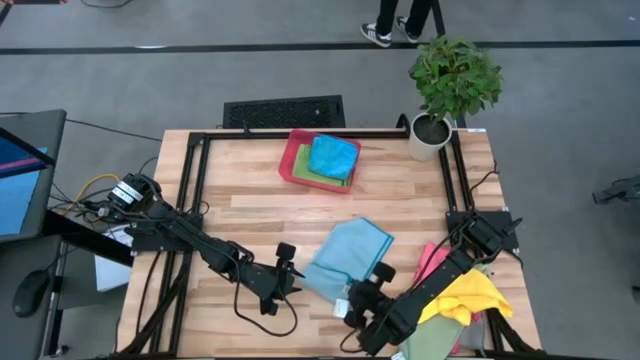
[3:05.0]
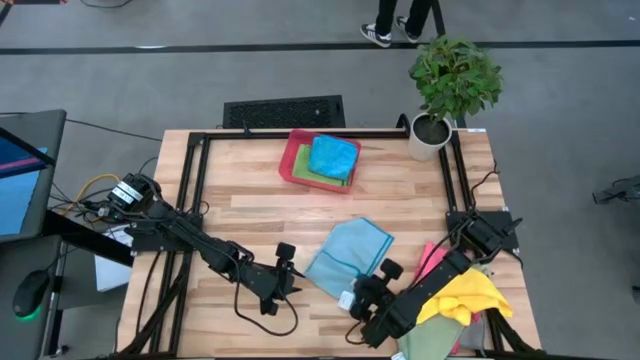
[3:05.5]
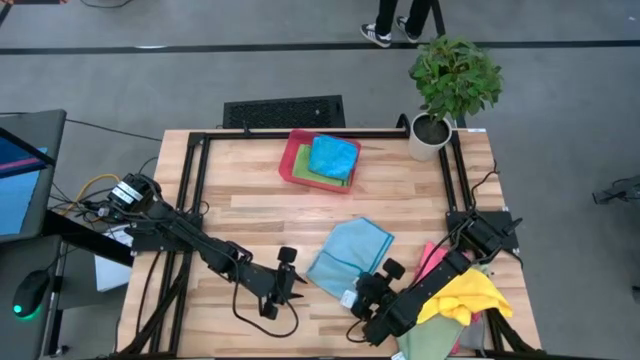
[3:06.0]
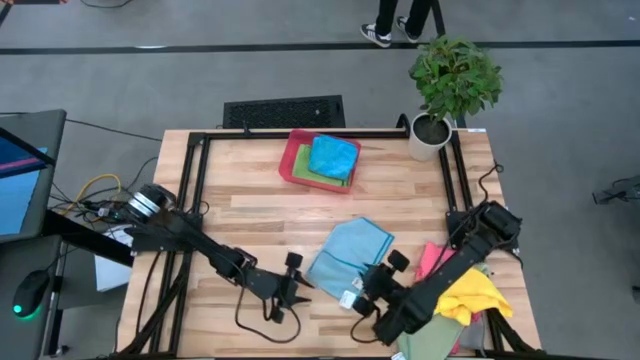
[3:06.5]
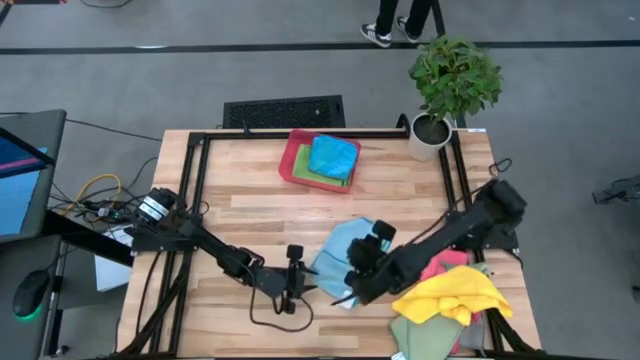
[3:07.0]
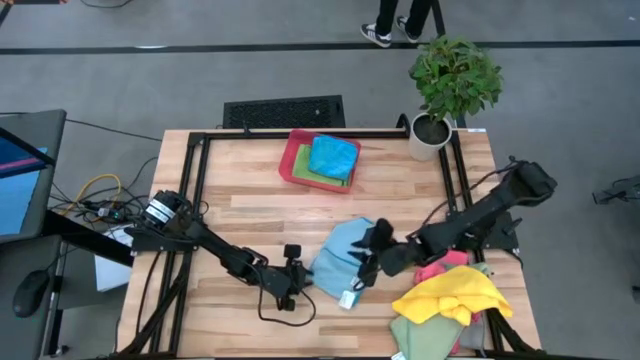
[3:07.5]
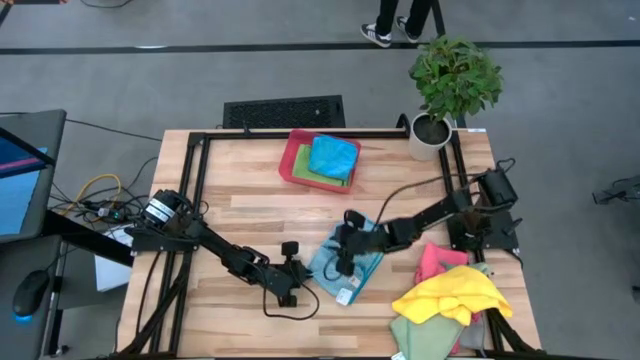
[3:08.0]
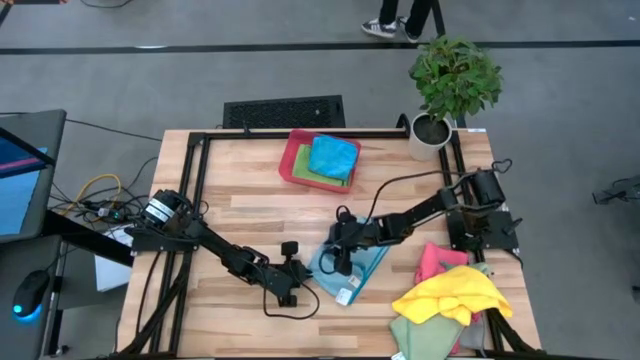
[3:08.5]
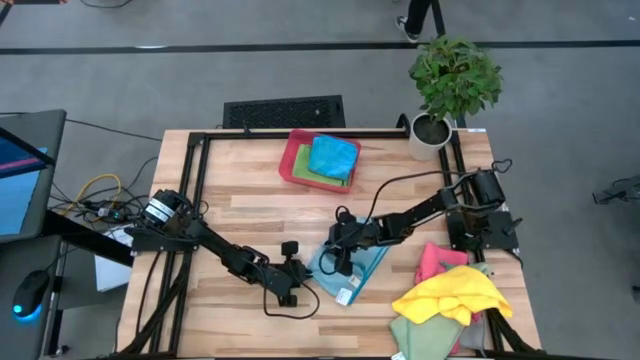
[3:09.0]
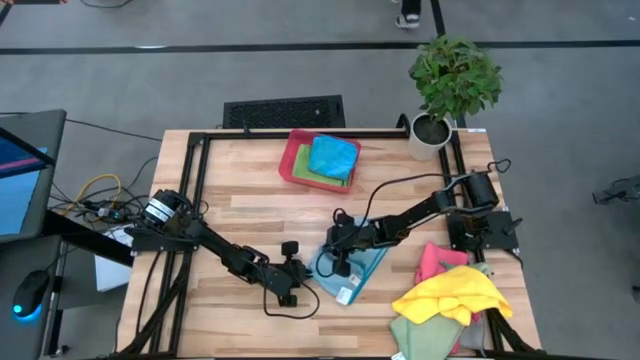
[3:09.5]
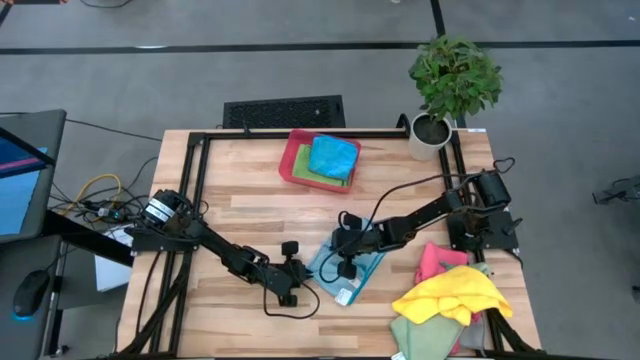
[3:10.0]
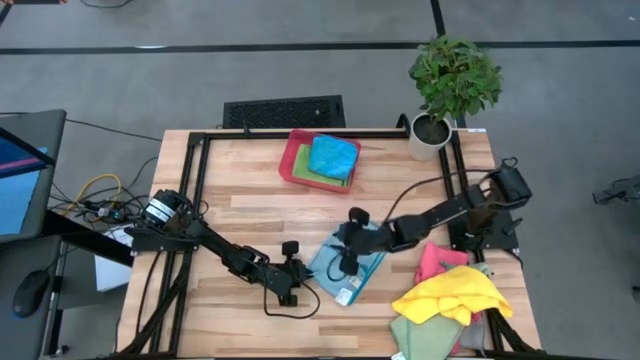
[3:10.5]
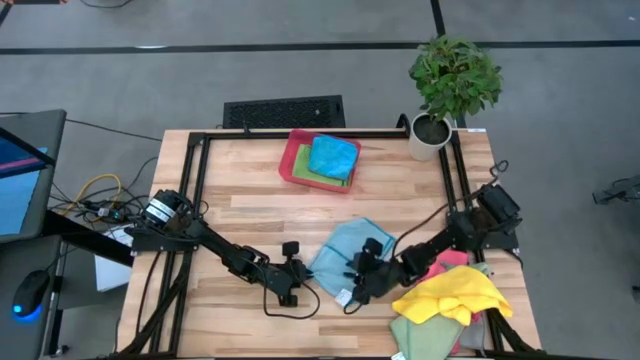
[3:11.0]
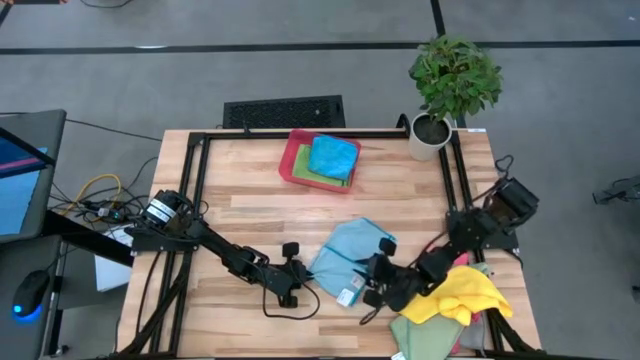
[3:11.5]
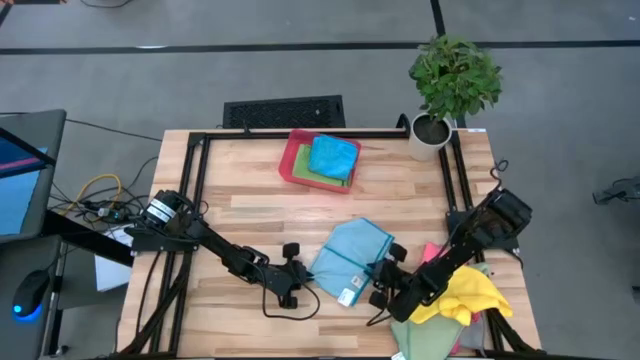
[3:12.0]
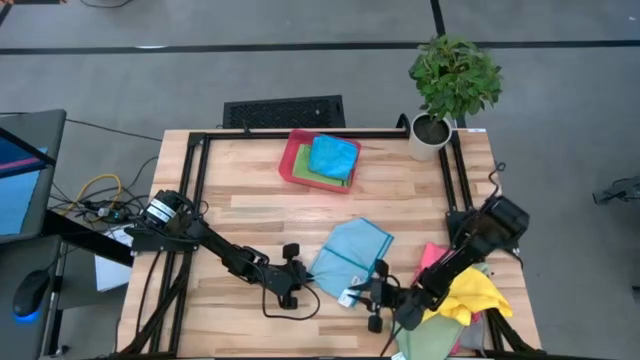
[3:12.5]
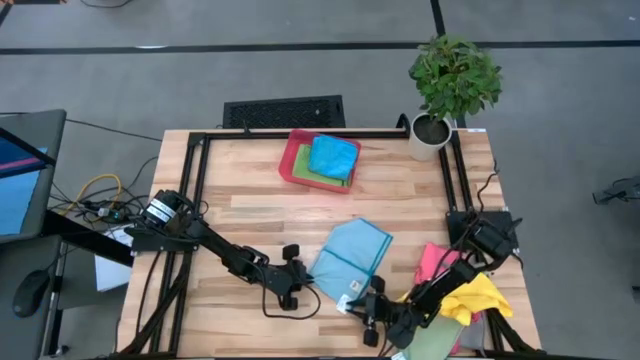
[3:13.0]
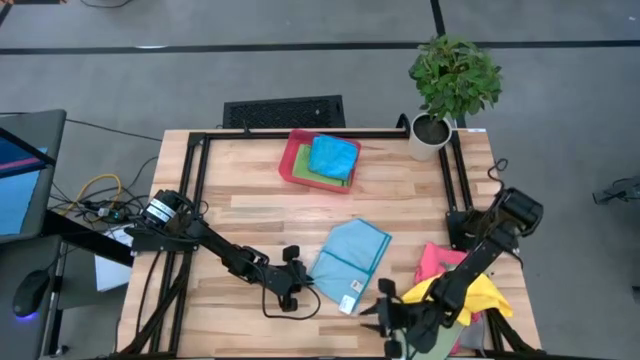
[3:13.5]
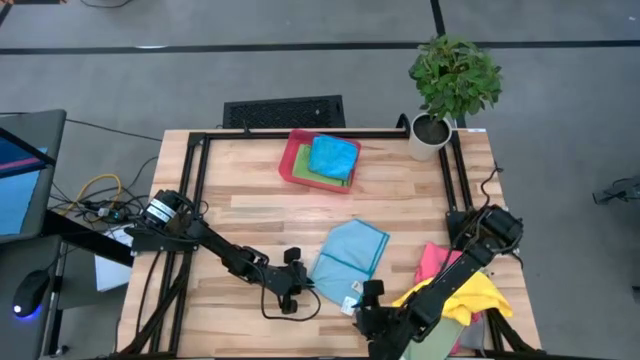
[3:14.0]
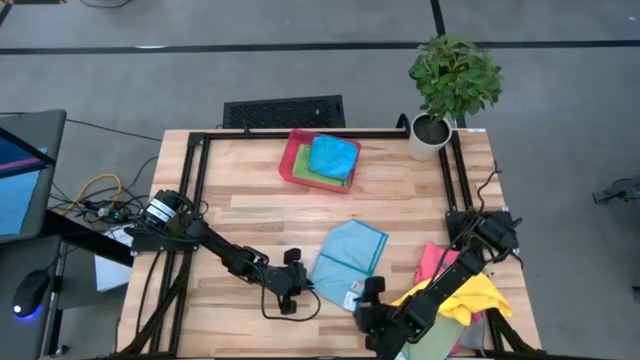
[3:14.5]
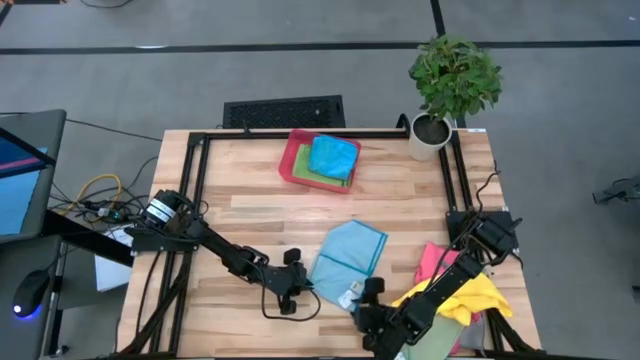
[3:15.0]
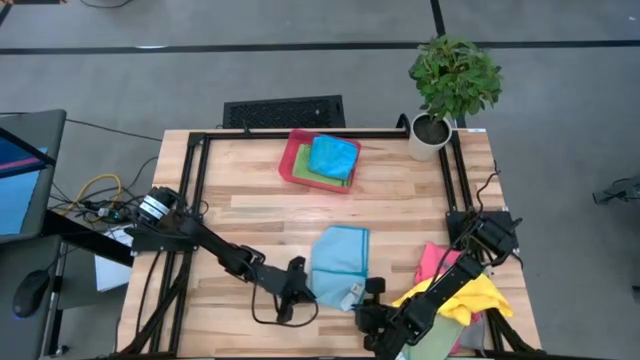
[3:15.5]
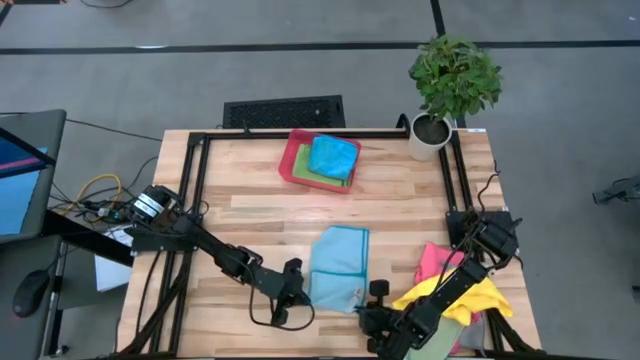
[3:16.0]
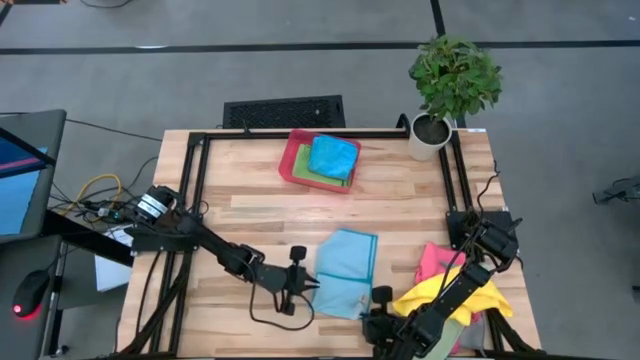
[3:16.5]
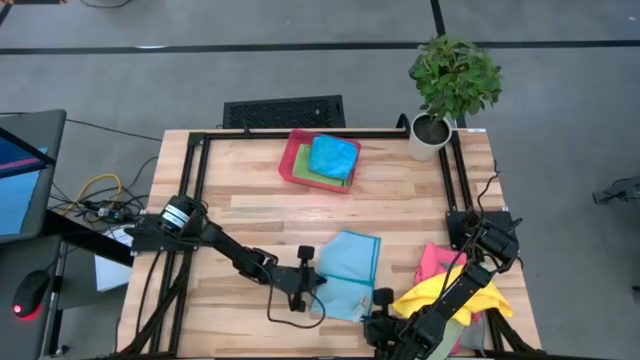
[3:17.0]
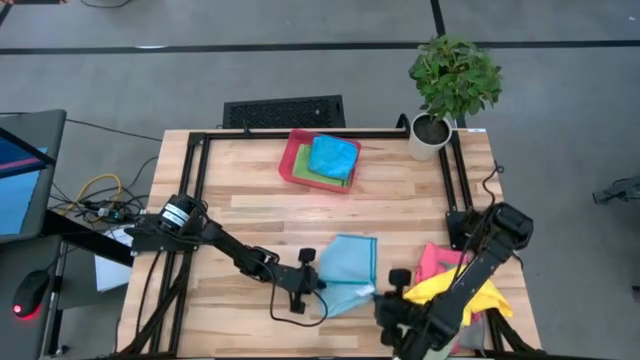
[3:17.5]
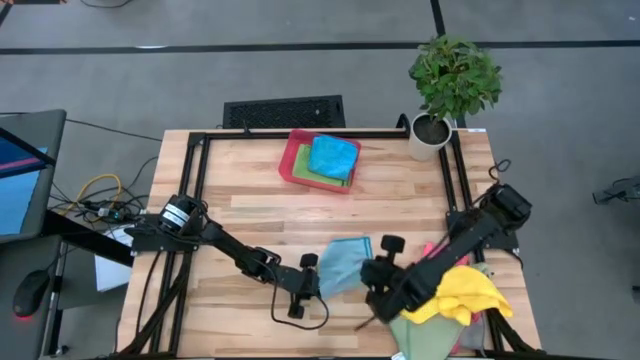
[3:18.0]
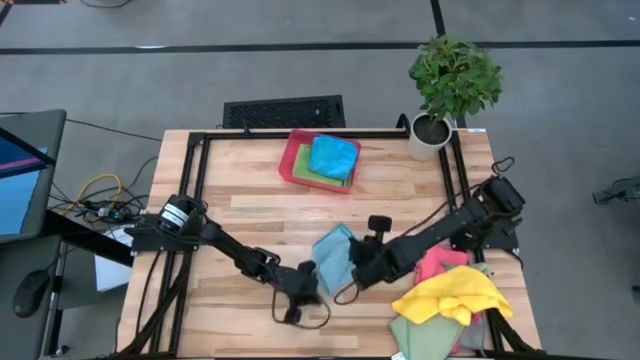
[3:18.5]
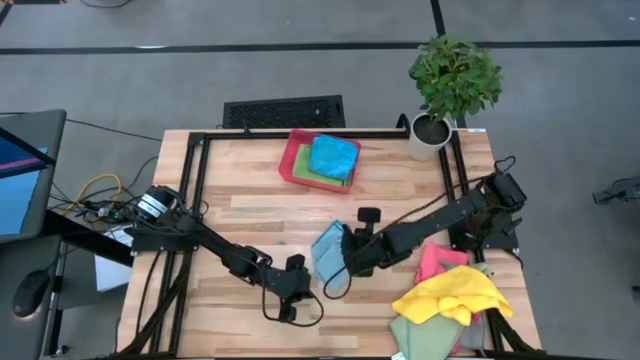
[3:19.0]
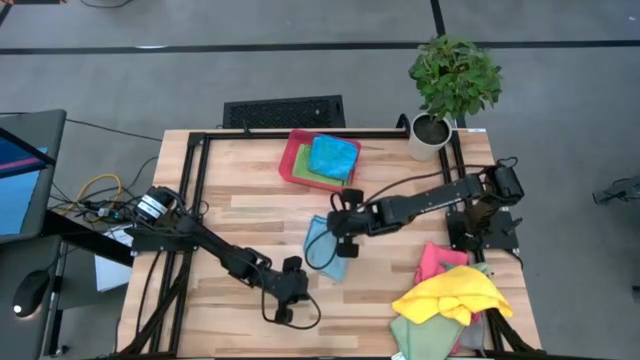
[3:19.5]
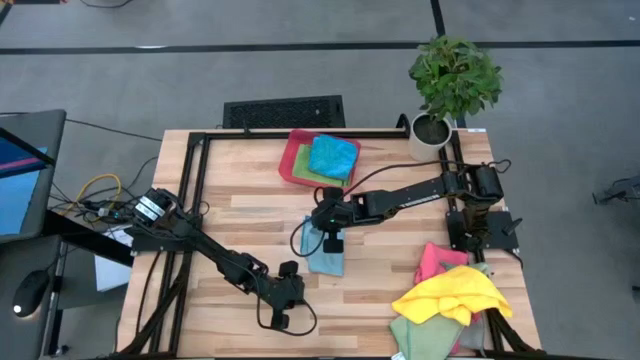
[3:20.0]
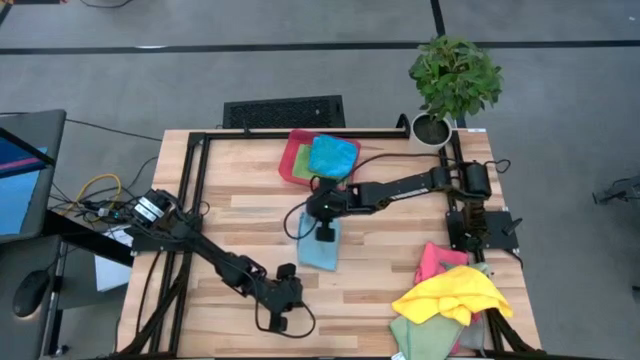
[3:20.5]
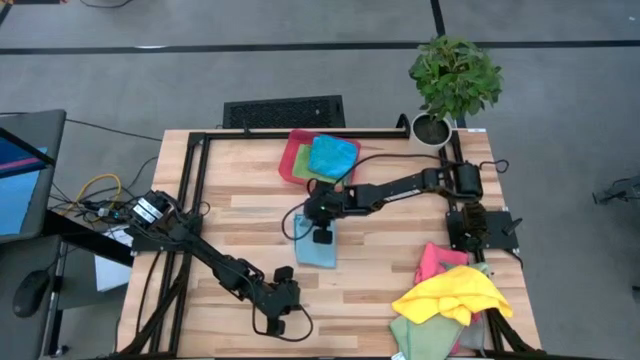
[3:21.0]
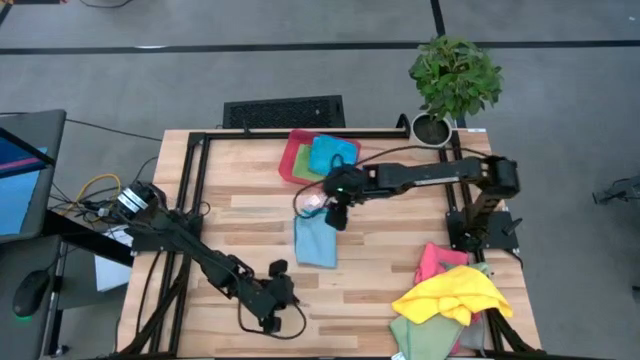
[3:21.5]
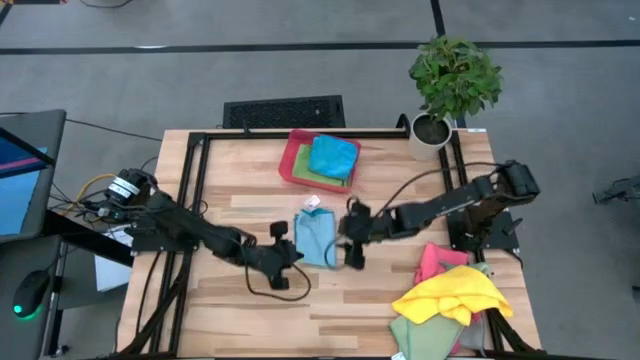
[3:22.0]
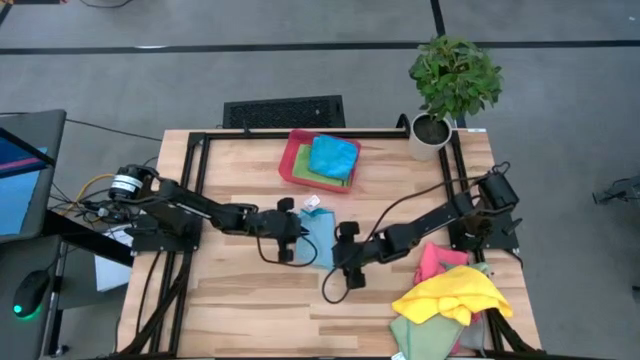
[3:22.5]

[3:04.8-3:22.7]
Task: Fold microfiber towels
Fold the light blue microfiber cloth

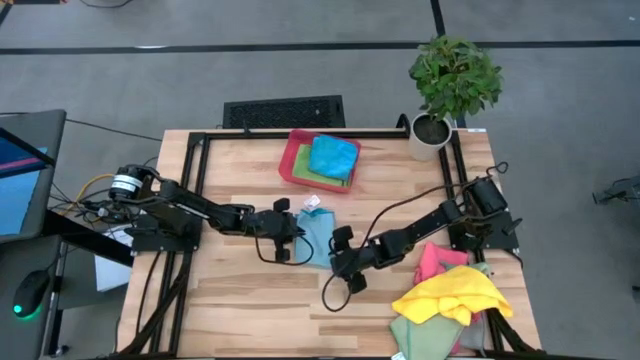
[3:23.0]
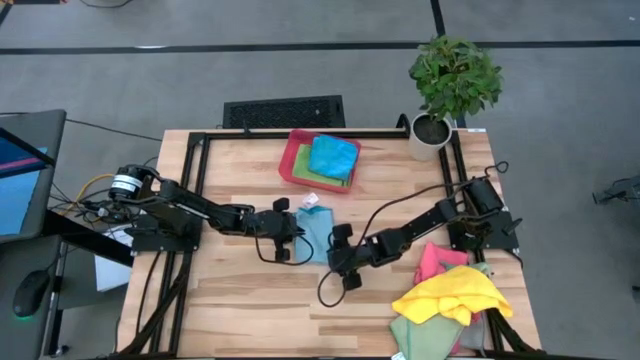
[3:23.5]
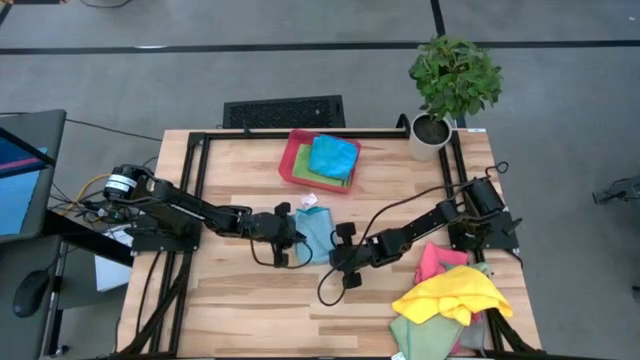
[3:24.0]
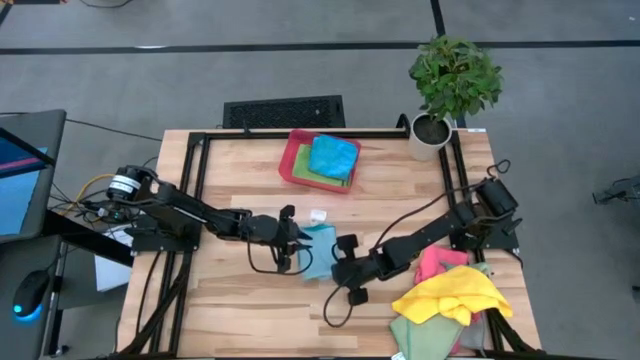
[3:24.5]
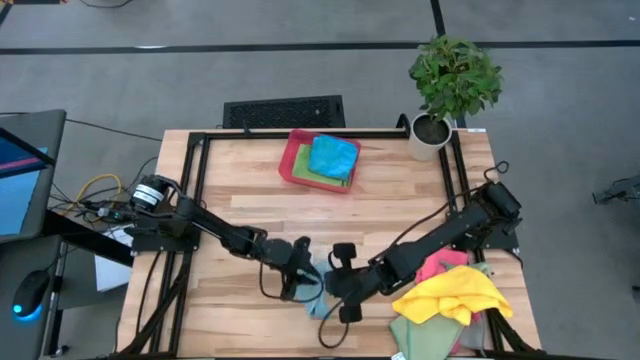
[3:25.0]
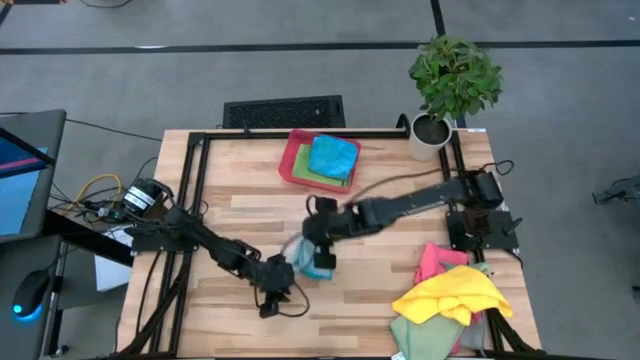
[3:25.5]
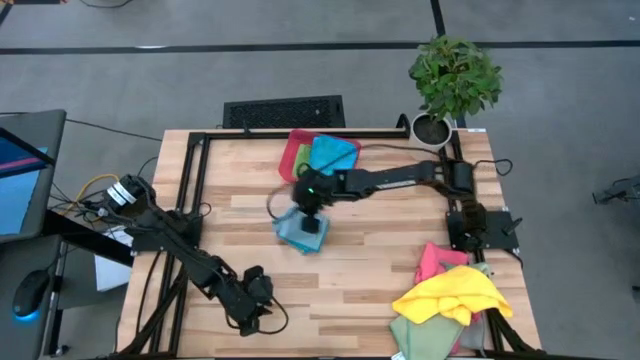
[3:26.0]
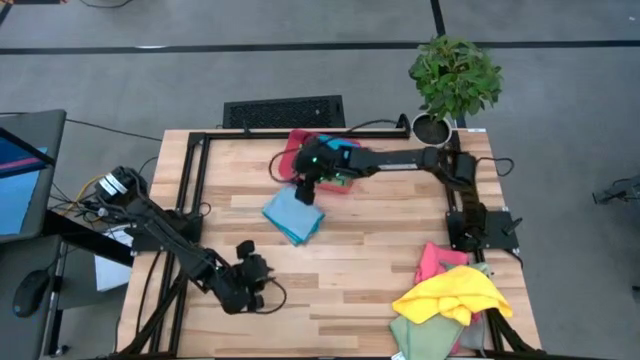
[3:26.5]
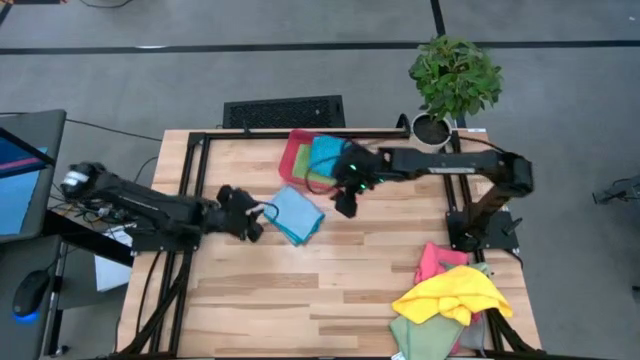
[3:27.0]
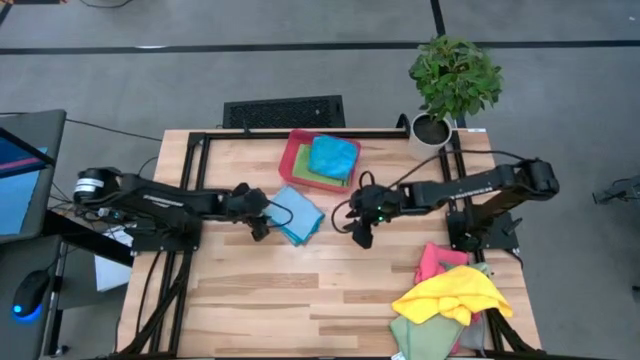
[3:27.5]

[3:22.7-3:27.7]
Stack the light blue microfiber cloth on top of the blue microfiber cloth in the red bin
